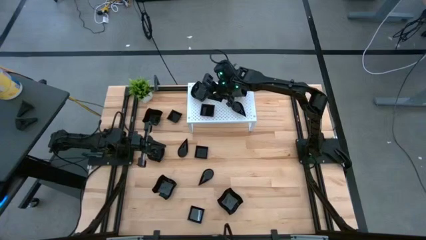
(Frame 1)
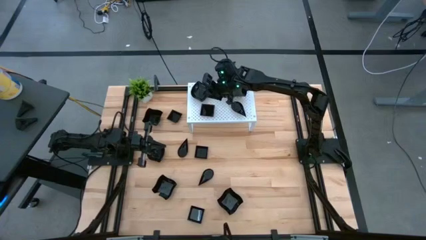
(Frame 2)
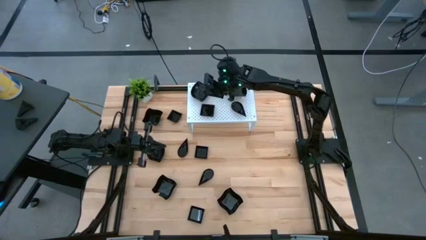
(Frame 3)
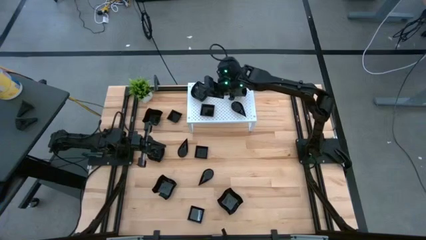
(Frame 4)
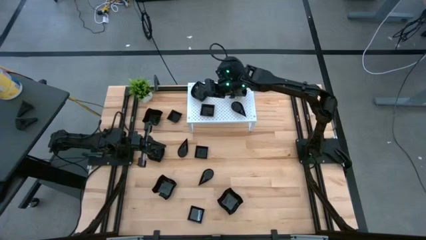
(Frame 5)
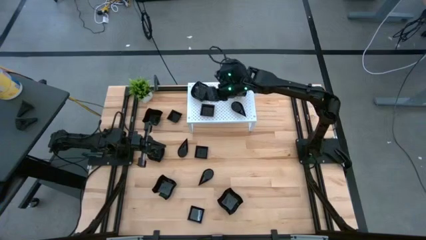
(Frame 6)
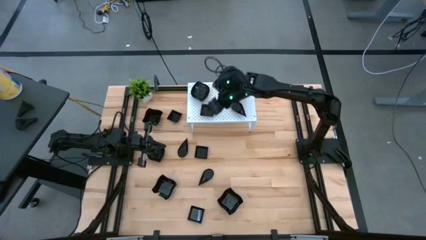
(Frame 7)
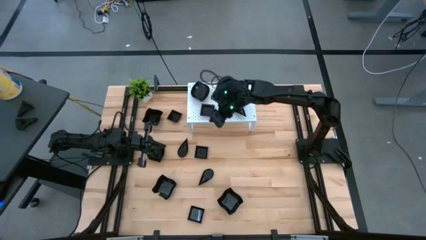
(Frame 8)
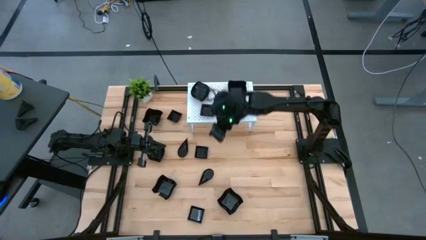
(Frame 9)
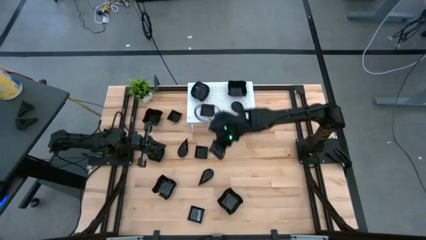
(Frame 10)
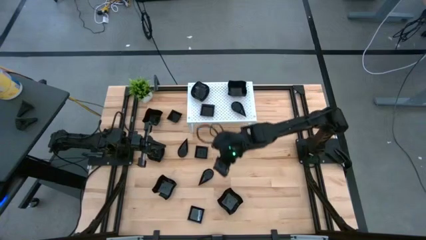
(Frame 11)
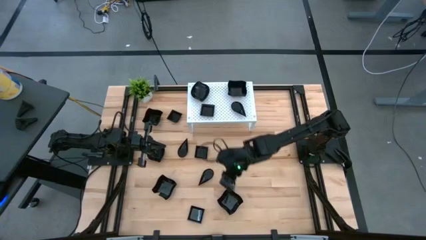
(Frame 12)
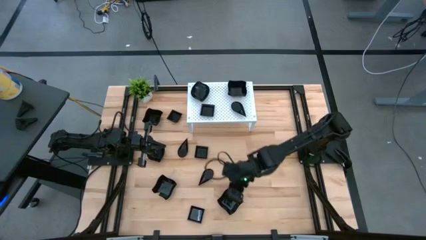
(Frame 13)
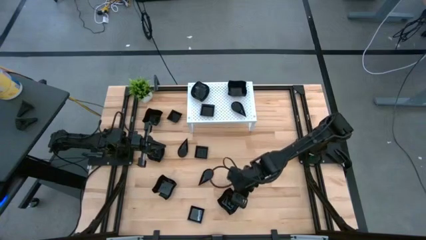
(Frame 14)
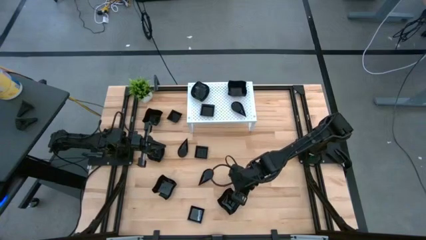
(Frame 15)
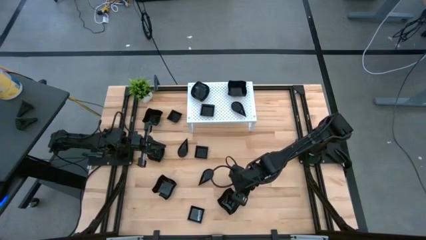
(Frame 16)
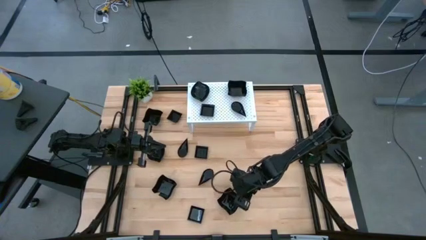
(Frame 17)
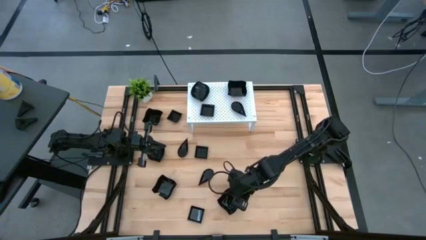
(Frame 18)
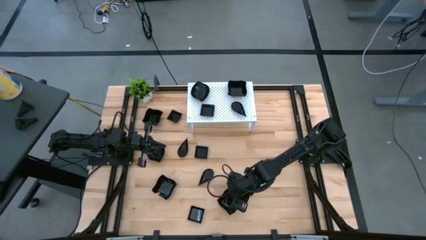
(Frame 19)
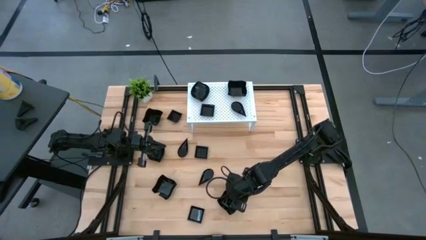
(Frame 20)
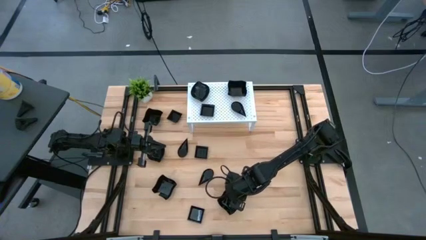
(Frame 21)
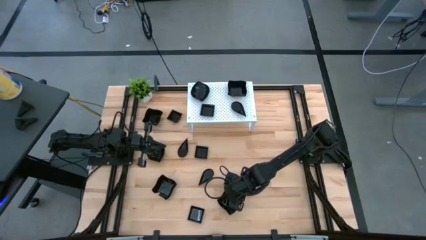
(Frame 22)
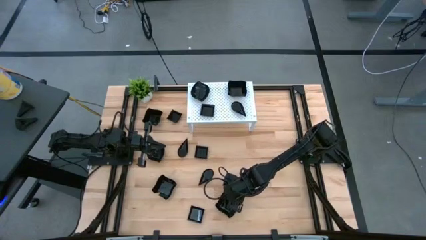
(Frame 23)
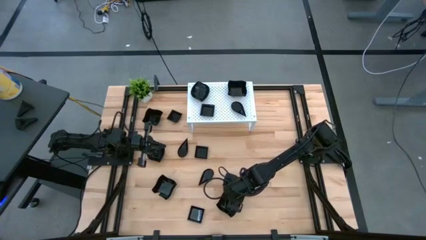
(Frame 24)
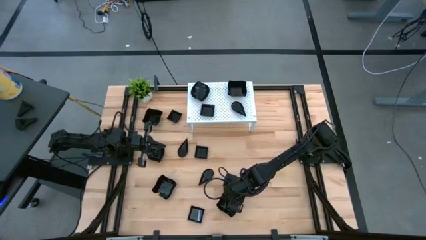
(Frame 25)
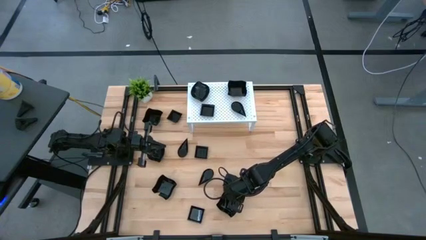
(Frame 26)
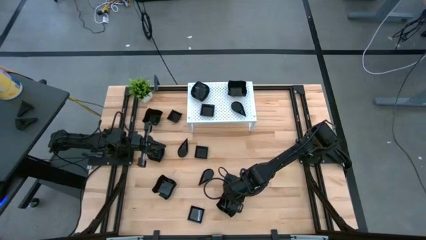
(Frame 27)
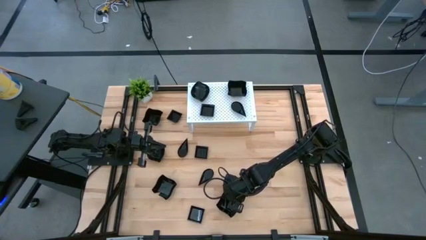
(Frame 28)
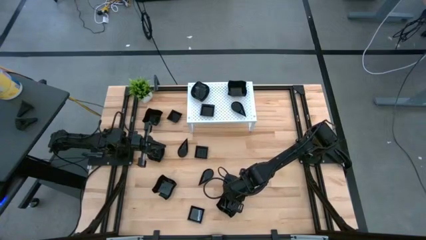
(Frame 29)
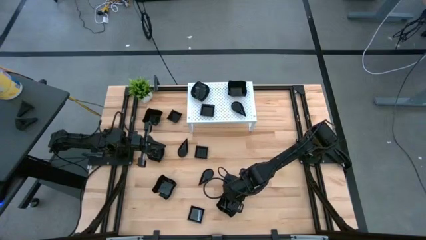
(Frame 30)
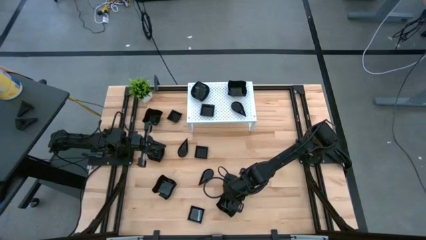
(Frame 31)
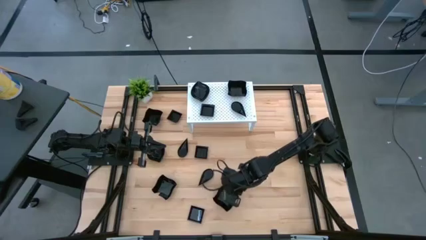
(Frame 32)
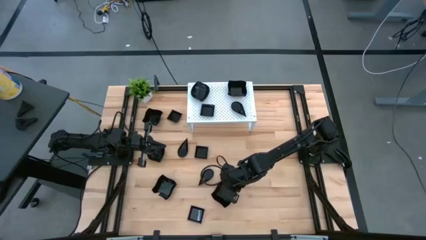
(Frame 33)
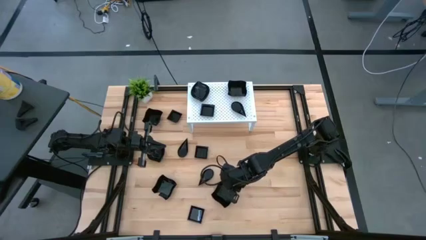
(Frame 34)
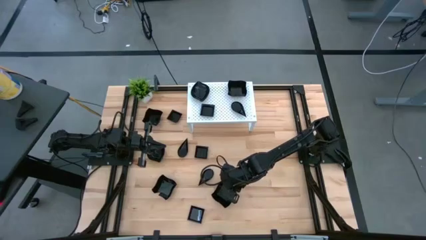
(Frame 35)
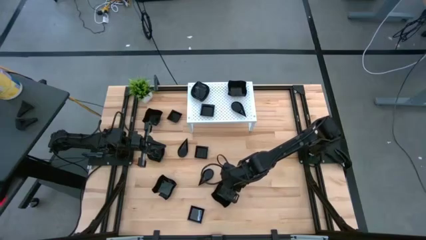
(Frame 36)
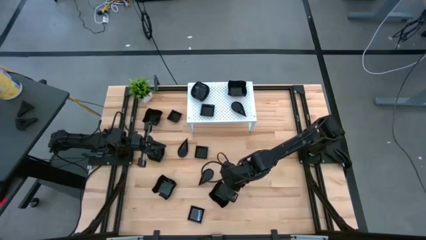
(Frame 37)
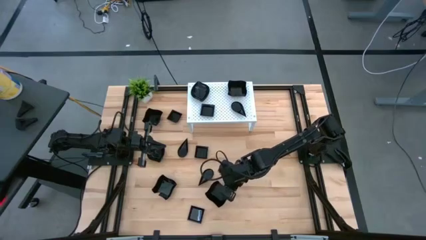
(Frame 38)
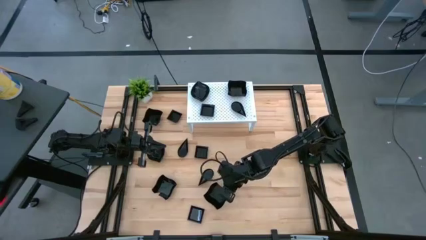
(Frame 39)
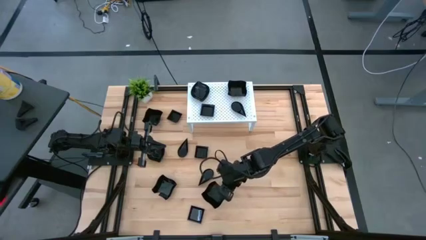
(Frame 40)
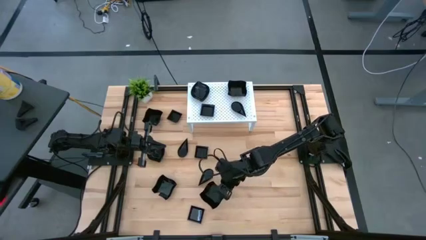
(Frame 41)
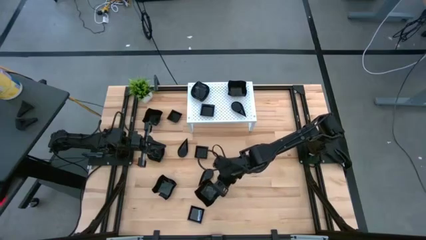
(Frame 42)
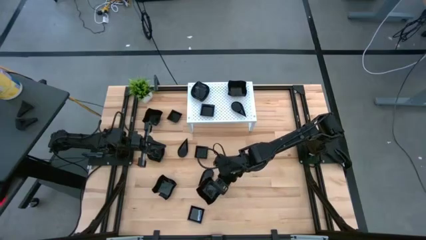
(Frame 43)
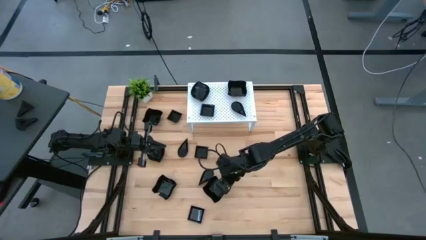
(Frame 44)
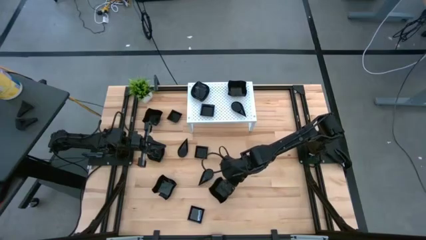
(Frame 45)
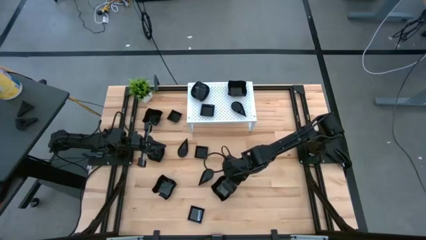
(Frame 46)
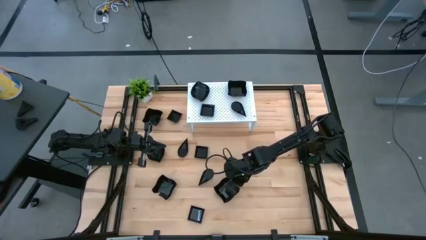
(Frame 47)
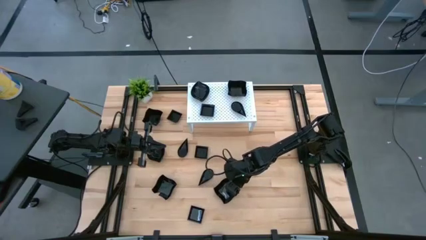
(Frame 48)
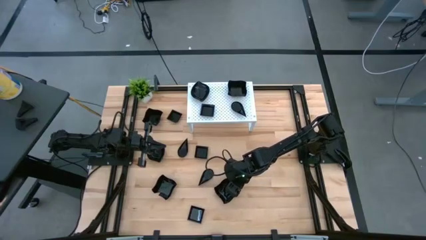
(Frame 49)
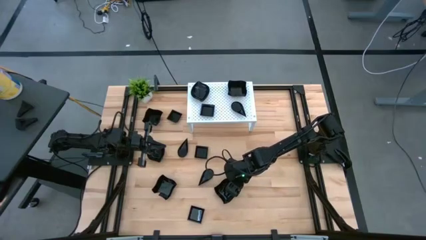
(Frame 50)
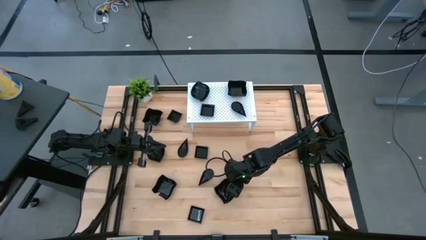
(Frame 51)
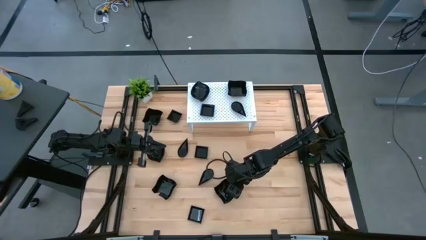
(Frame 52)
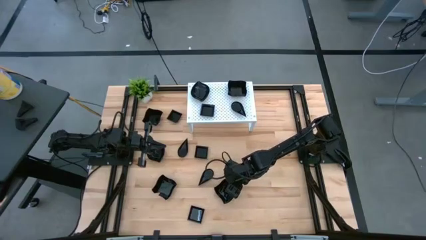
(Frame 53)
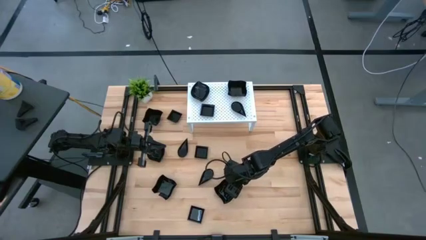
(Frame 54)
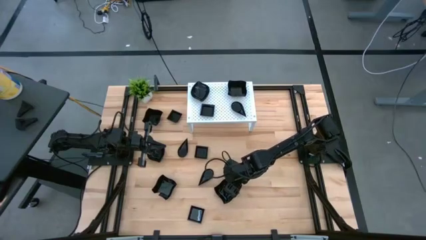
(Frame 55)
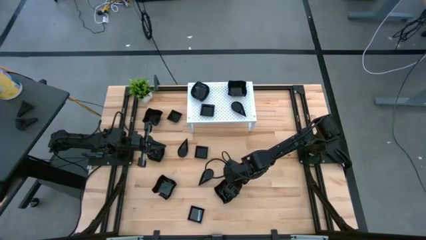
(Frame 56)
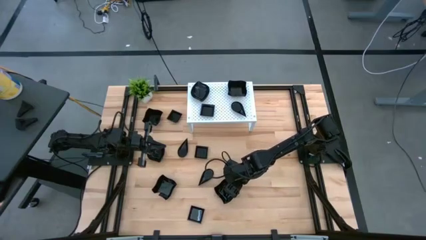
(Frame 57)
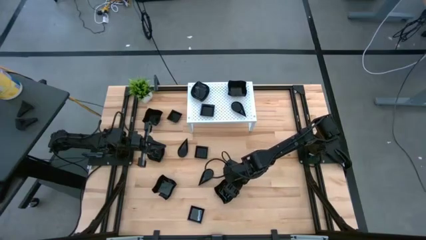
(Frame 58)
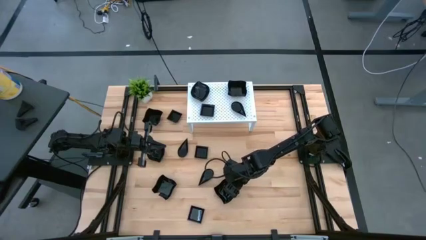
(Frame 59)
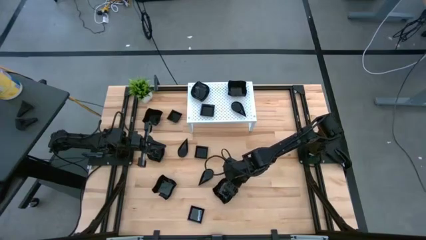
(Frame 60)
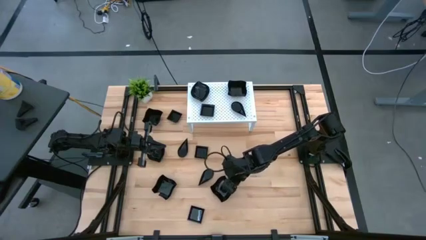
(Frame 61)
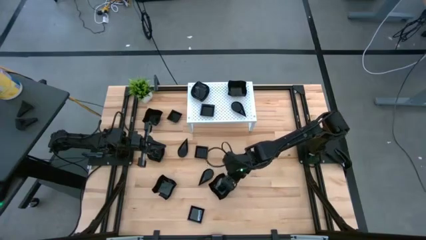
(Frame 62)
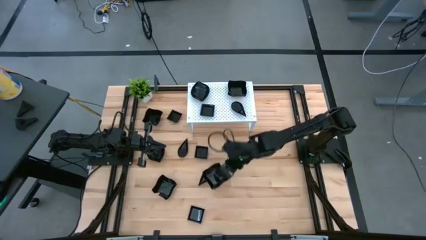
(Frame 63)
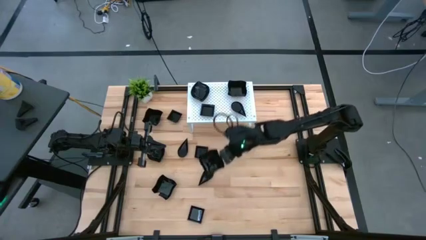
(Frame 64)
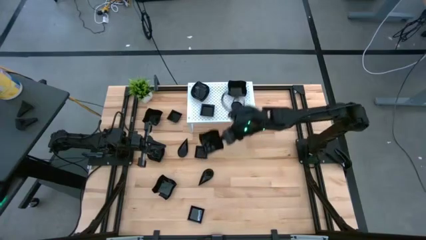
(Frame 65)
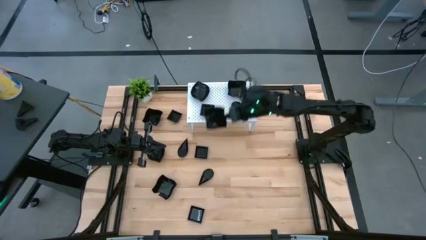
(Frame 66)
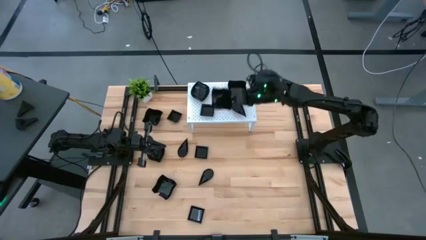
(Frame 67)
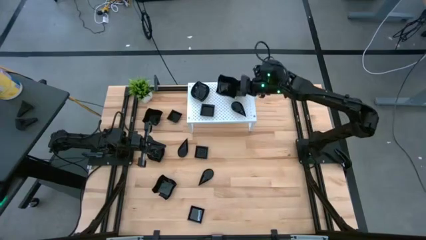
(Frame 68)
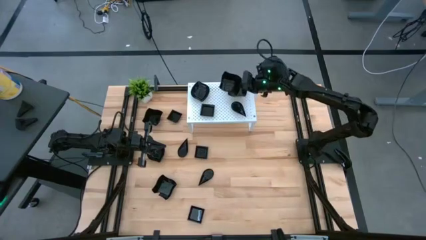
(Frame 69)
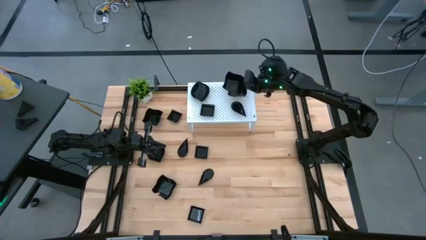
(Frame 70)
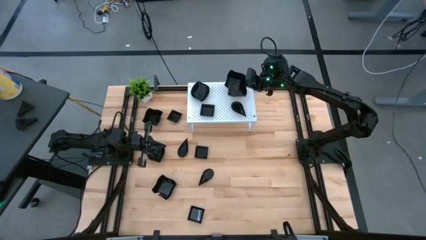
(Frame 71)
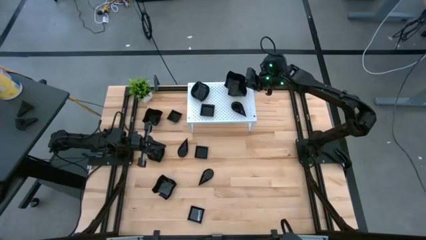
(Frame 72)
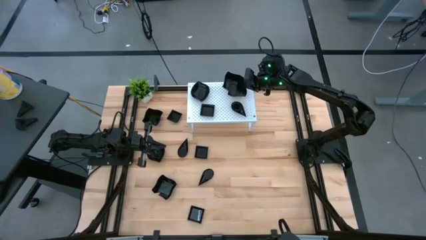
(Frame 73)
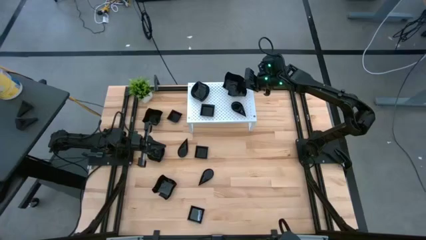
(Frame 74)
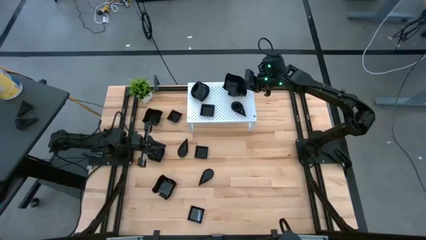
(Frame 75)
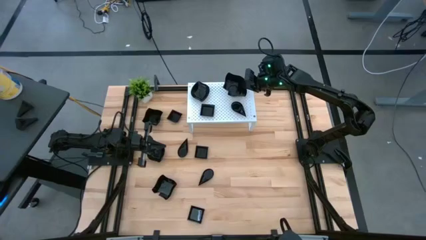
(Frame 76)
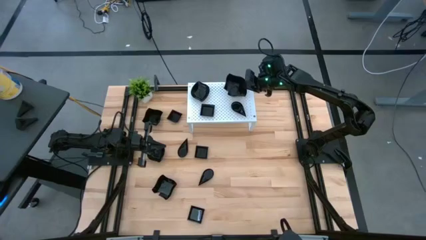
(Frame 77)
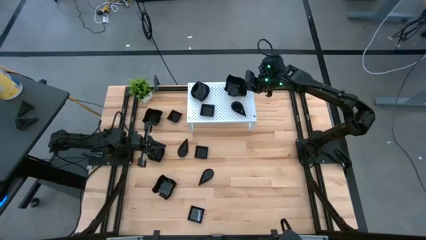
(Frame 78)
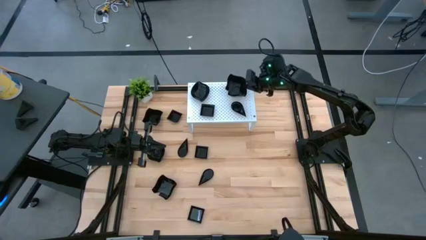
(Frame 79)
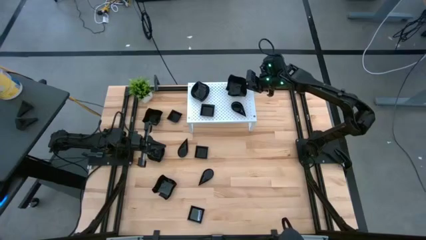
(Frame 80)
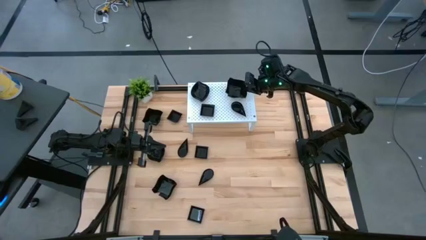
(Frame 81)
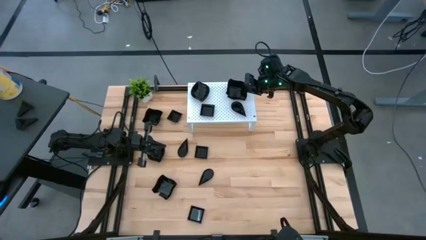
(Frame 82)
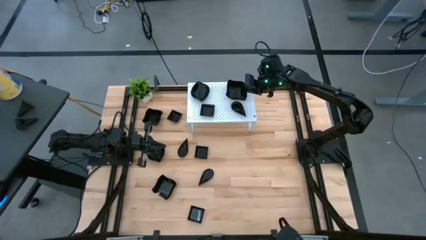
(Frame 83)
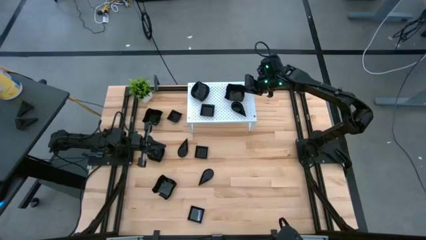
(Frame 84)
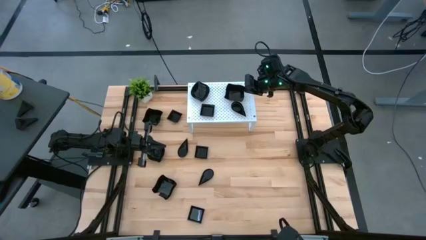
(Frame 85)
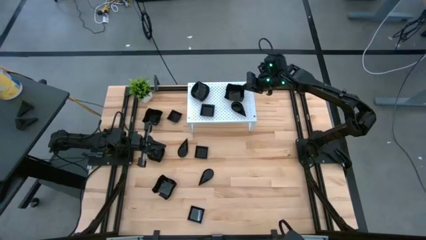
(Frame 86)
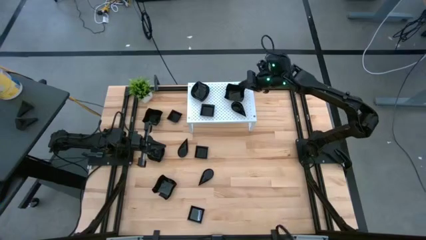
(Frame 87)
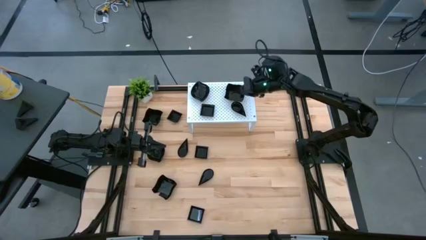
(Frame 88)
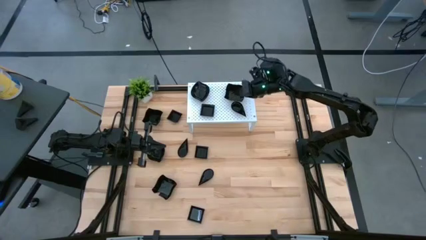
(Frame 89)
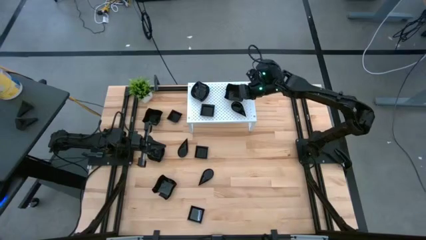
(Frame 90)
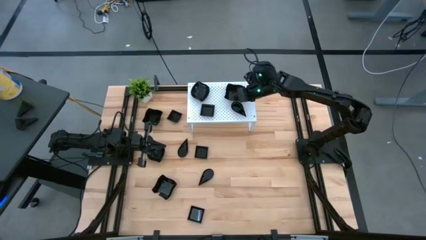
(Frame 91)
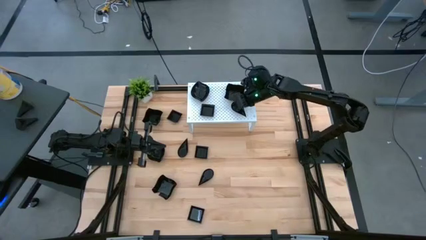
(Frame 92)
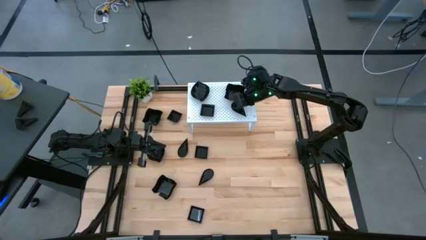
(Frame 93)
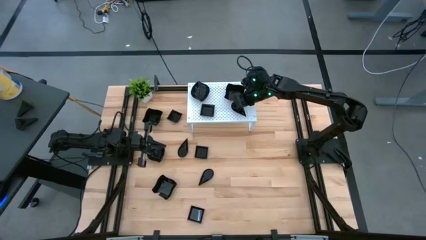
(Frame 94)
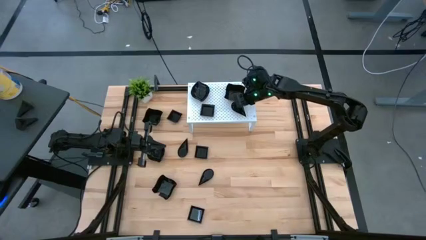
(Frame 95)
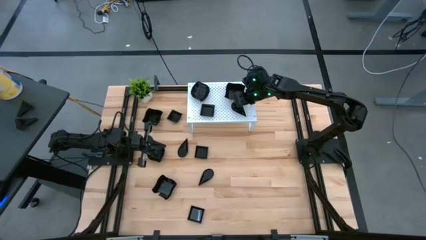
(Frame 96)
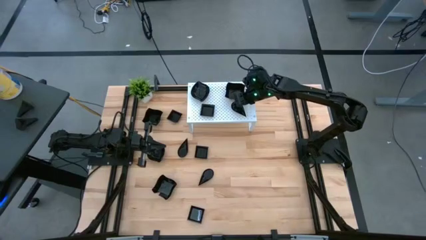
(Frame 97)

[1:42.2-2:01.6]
Task: Pick & Place Mini shaped plates
Stack the distorted square plate on top of the distorted square plate on the shelf
